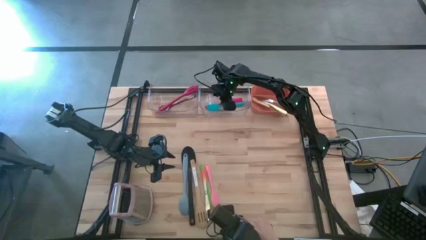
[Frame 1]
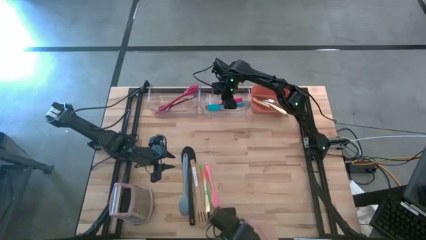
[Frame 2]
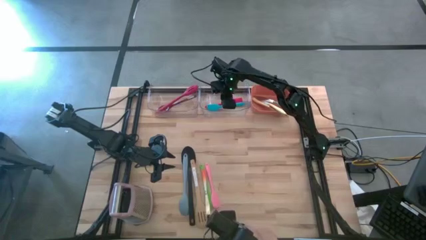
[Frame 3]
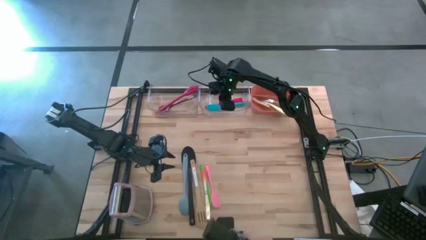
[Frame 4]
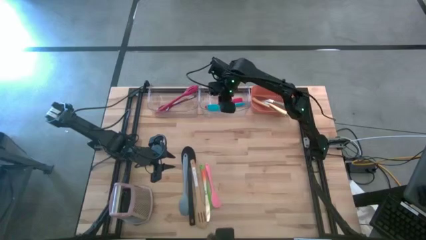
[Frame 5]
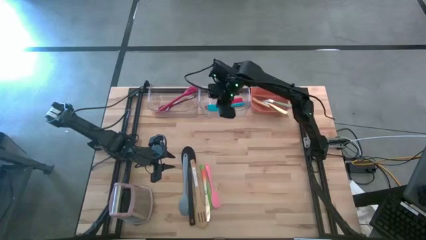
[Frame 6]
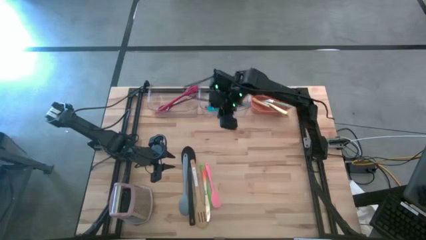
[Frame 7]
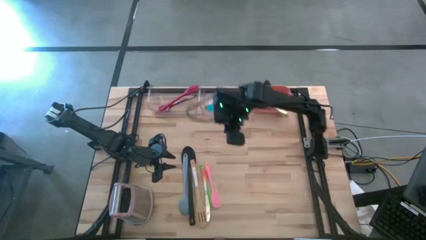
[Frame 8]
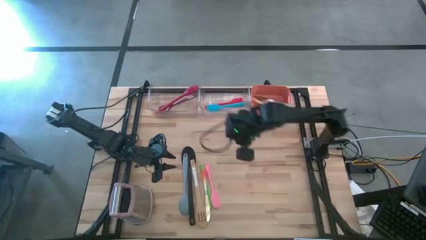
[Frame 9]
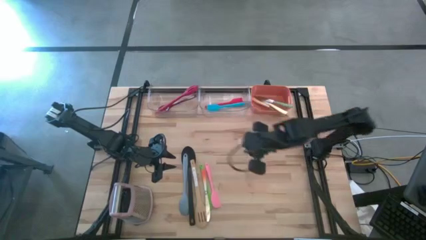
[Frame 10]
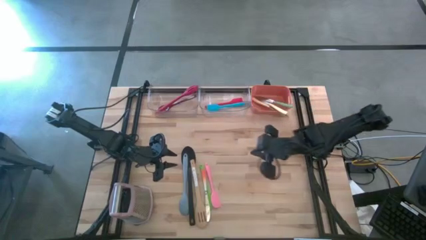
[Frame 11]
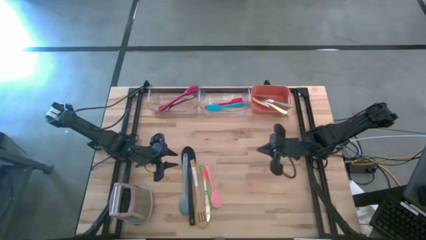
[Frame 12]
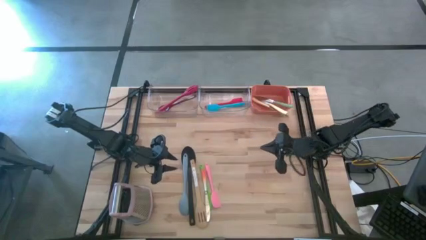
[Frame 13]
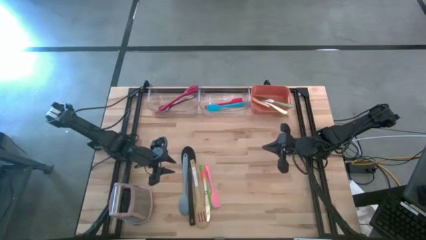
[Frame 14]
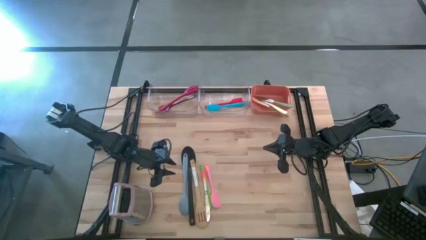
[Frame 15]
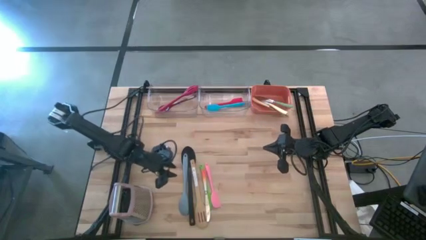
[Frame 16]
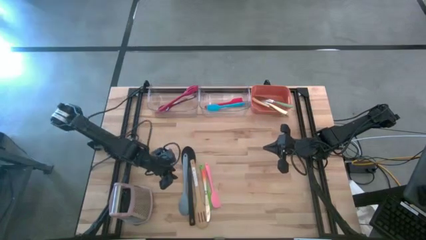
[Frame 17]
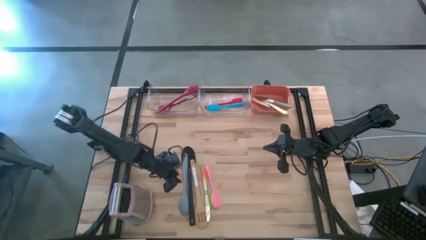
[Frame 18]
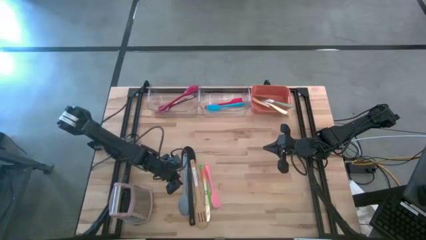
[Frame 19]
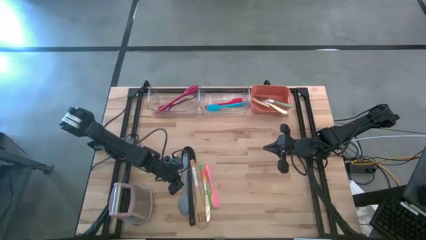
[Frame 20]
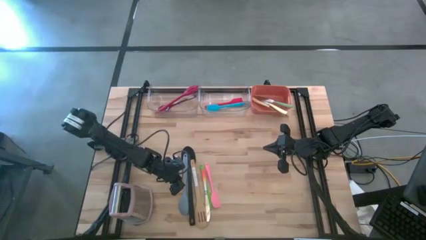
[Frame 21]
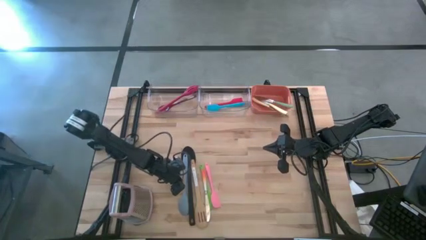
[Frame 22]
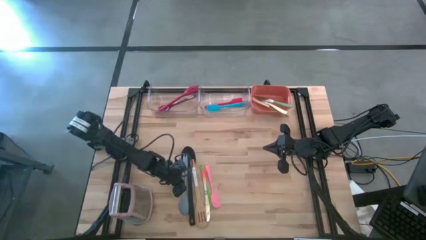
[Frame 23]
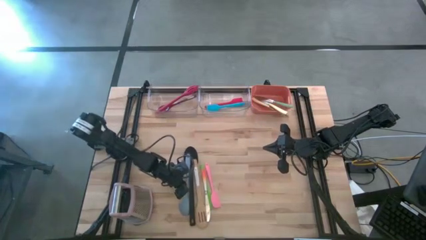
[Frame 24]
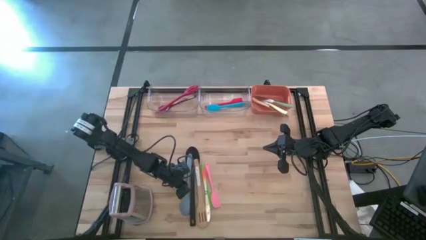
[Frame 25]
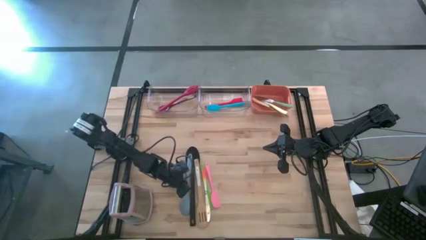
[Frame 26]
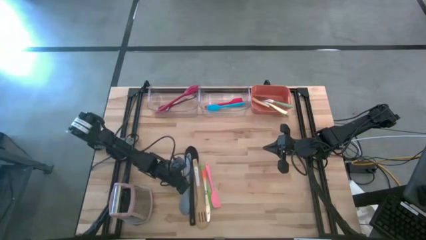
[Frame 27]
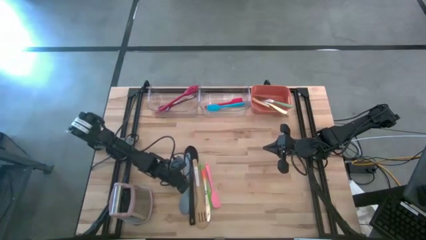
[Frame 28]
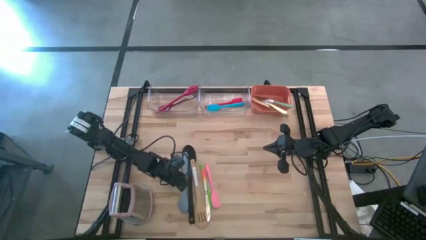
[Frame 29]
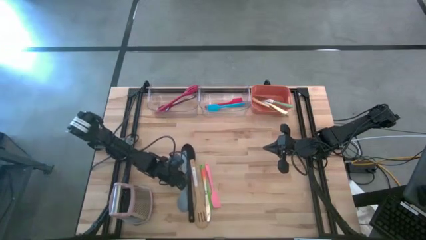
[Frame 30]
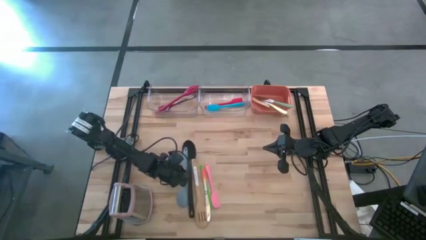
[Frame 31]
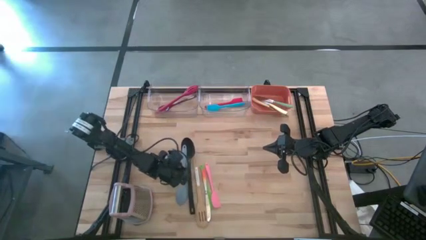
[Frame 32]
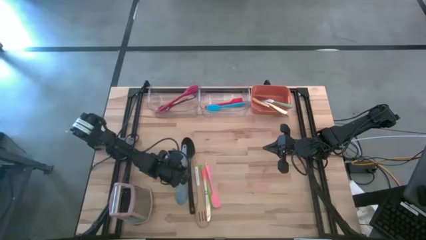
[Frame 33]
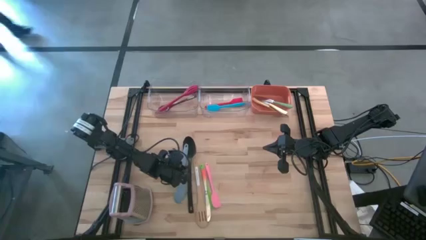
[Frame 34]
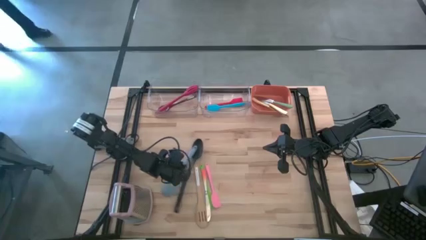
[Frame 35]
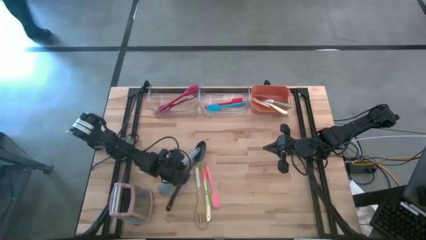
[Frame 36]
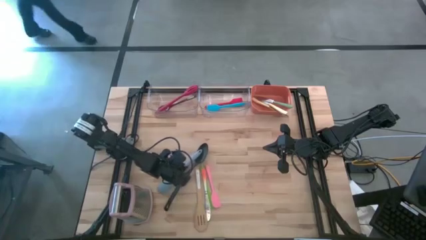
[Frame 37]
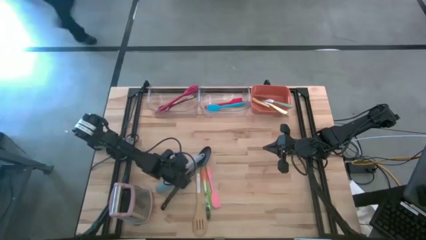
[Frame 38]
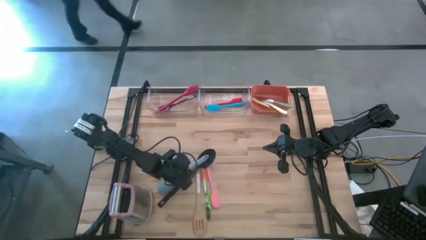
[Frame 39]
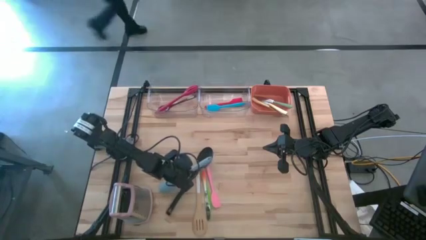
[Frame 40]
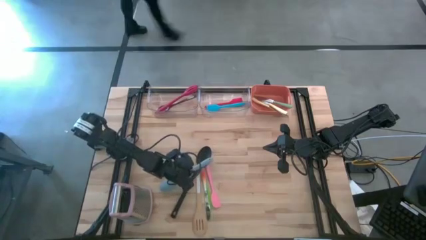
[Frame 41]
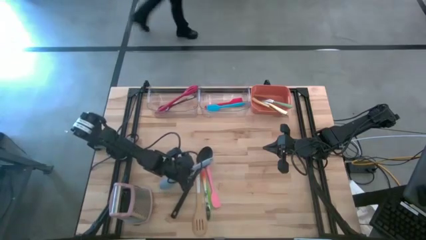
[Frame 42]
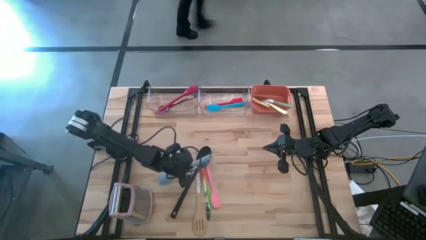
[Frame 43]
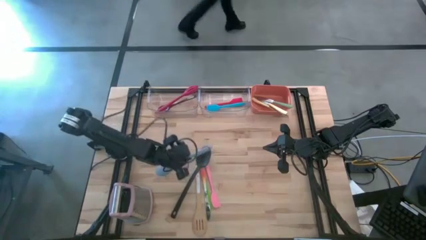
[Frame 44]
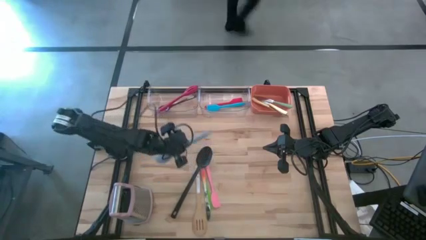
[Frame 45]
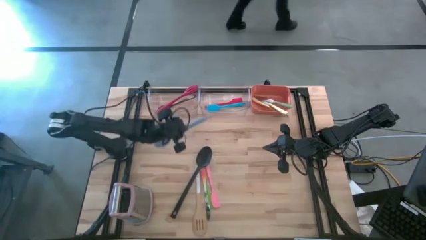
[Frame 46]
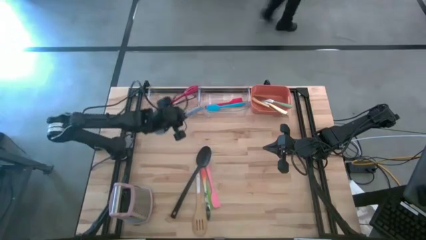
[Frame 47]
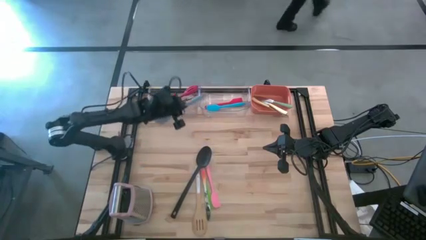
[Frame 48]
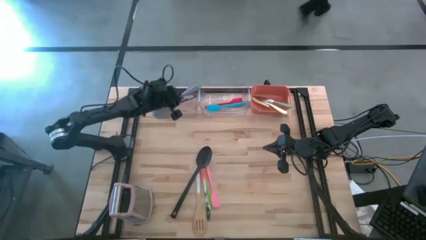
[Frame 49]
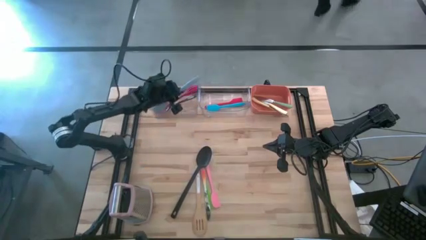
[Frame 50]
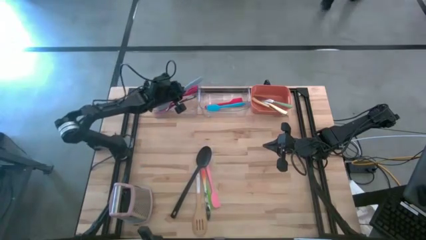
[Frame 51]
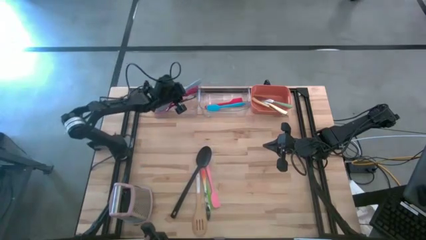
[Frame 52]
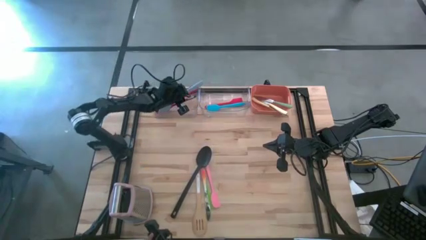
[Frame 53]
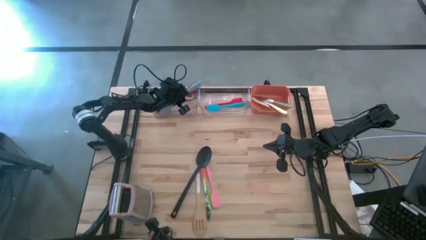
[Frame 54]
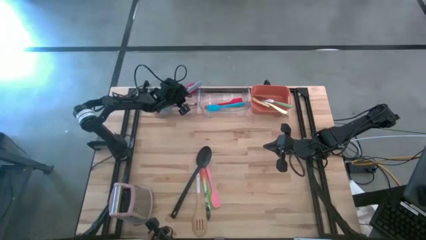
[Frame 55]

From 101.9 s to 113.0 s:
Task: Pick & Place Kitchen Items
Put the gray serving spoon into the left transparent bin

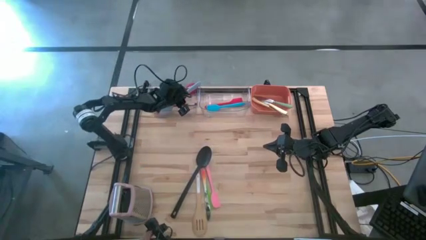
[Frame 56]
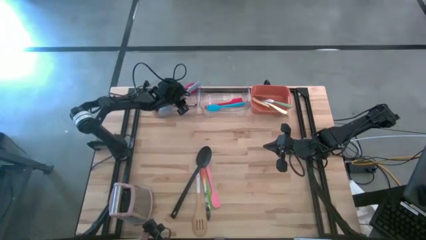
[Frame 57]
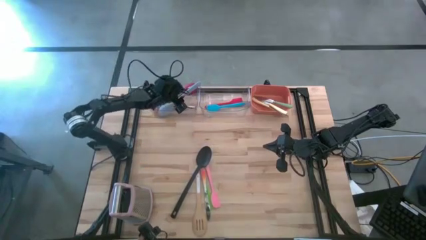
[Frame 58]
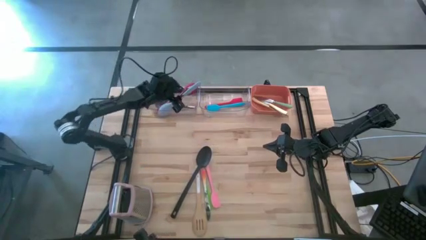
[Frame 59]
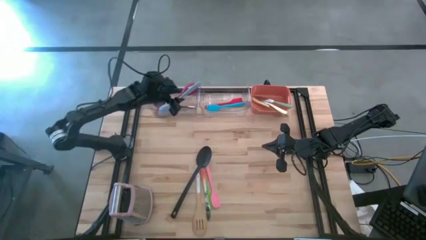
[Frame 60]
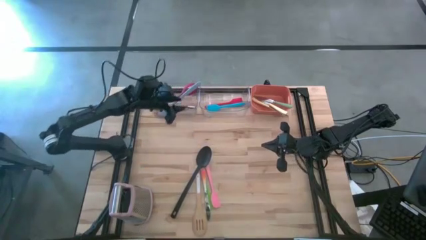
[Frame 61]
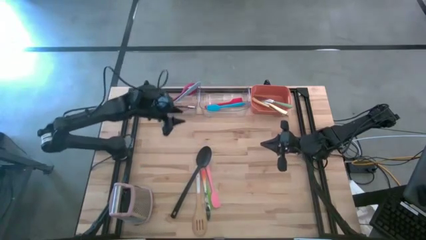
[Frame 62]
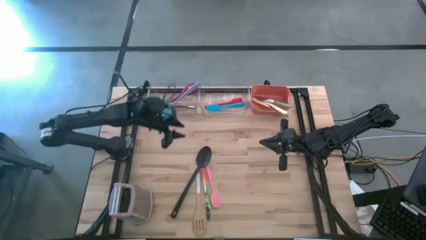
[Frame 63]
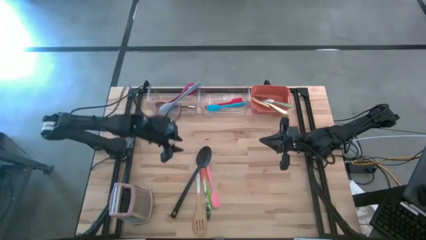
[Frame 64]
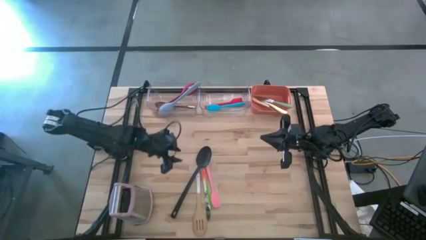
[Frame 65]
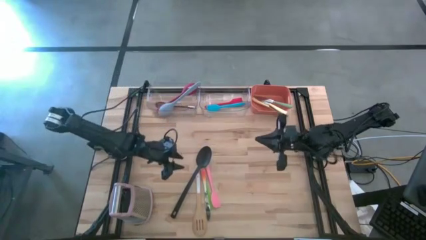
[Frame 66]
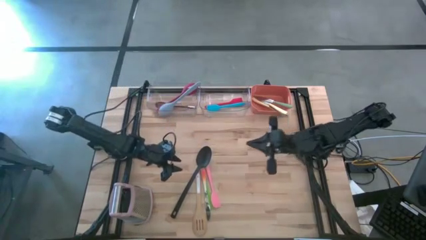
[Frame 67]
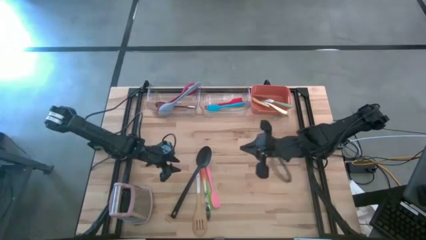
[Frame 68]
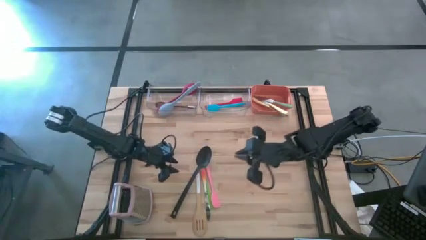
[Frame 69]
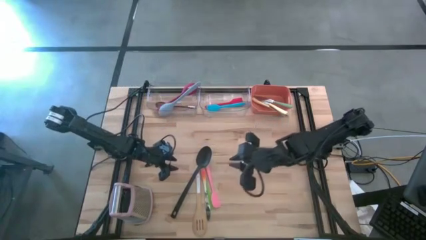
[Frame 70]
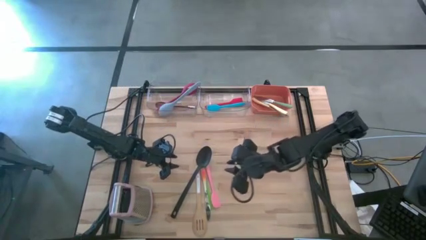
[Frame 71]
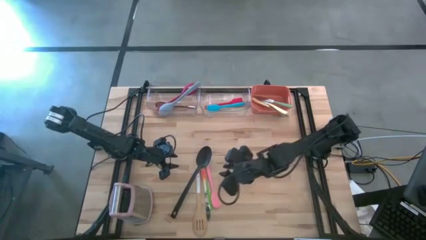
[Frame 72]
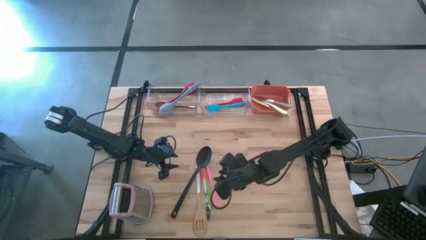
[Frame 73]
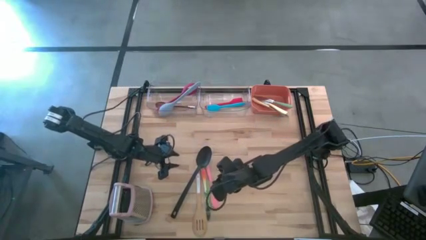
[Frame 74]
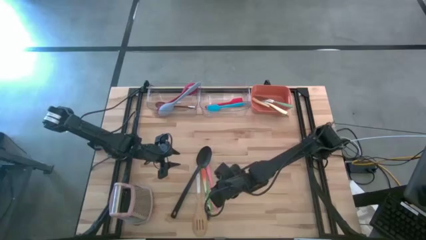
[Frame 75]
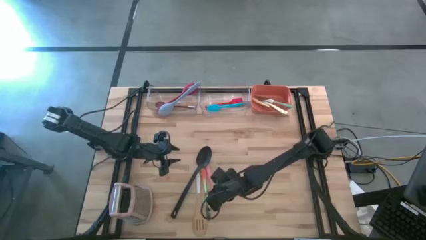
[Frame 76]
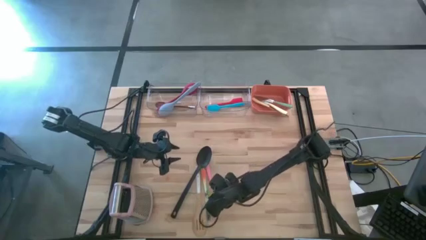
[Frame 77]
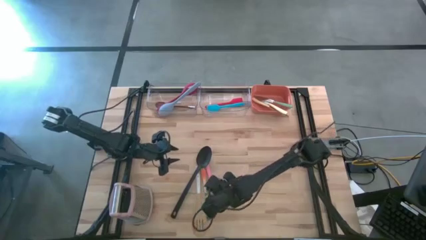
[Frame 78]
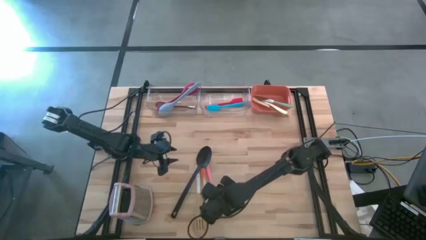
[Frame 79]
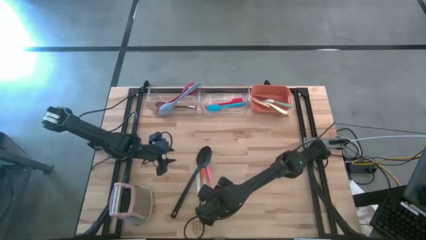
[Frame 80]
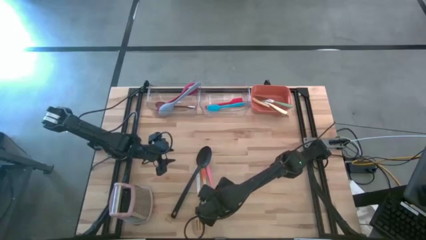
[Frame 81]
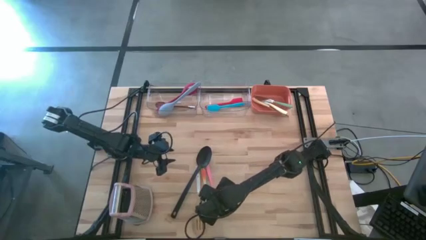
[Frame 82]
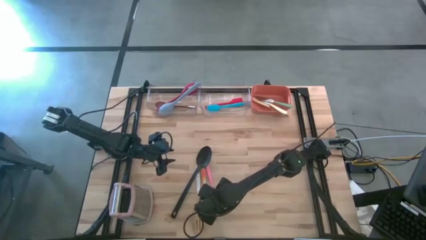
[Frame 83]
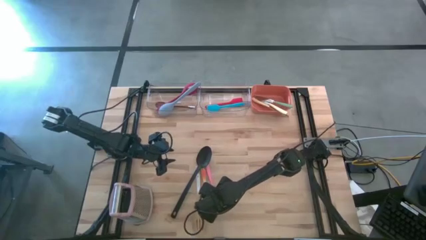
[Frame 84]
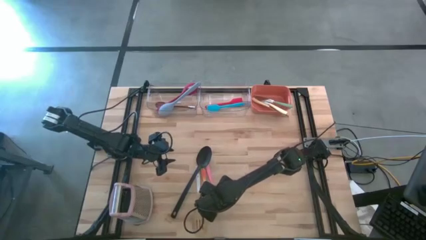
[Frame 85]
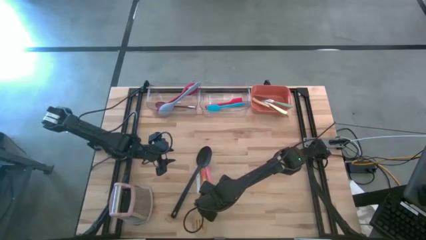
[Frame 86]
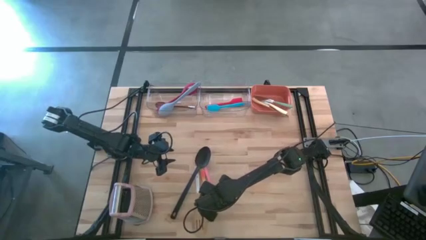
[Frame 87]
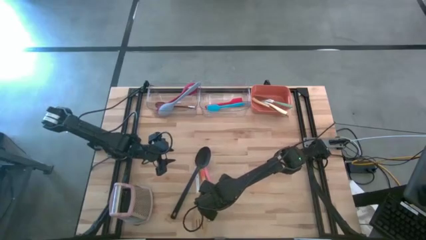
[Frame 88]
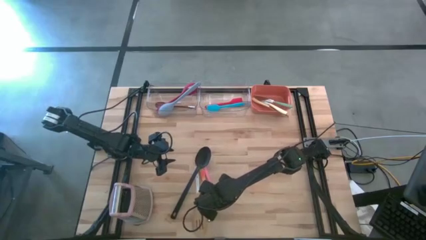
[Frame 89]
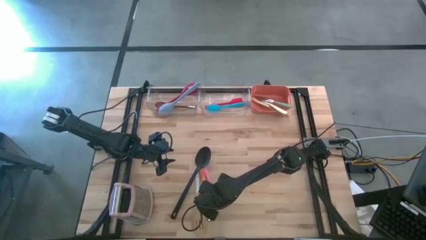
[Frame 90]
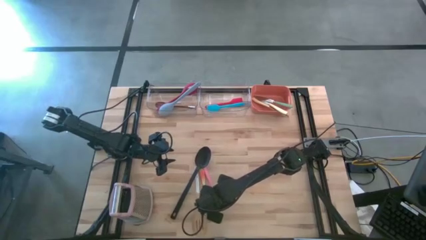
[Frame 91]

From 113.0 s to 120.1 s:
Put the pink spatula into the right transparent bin
